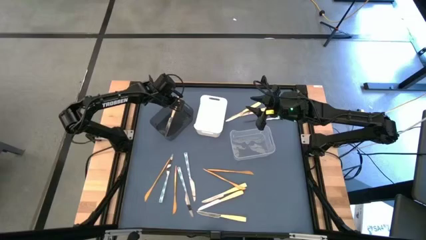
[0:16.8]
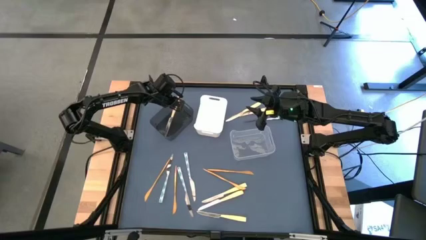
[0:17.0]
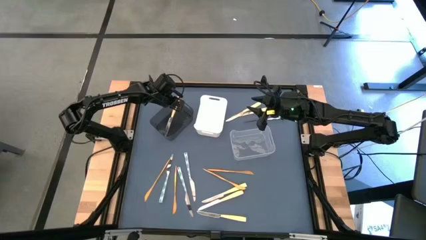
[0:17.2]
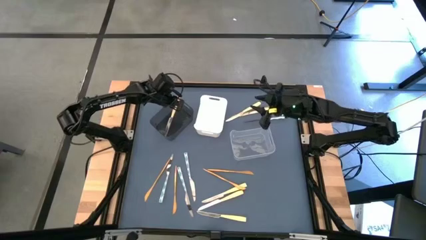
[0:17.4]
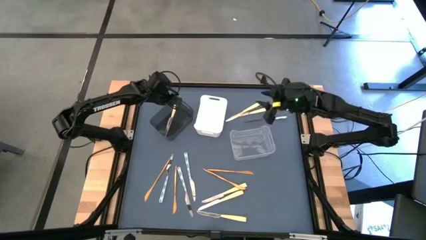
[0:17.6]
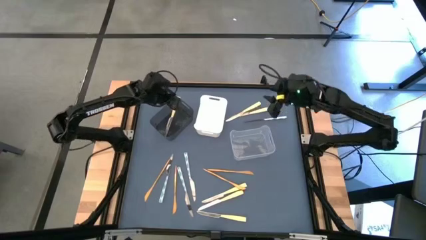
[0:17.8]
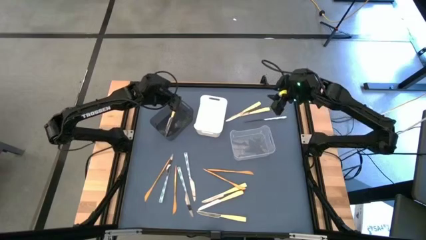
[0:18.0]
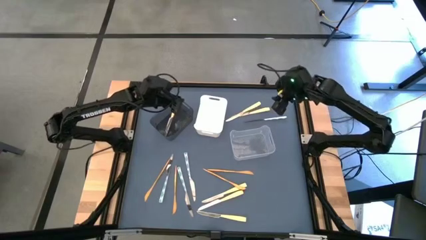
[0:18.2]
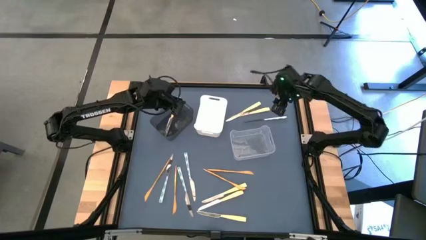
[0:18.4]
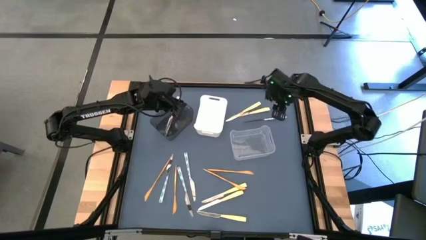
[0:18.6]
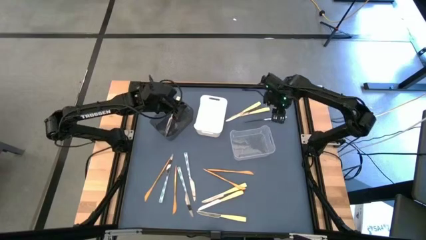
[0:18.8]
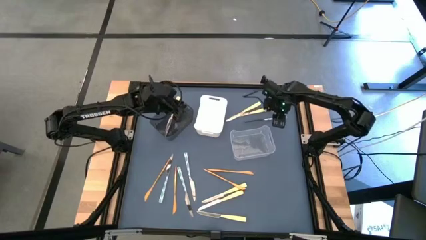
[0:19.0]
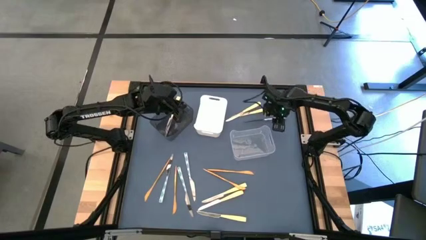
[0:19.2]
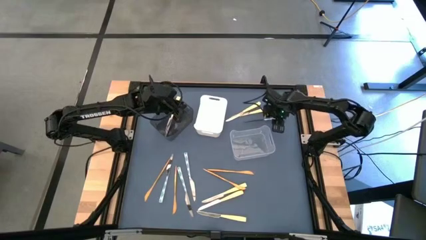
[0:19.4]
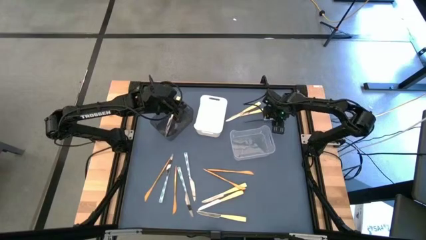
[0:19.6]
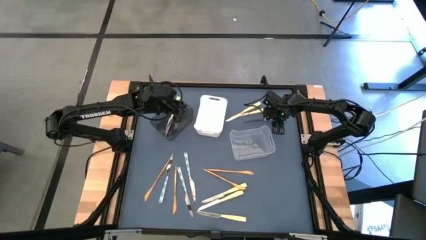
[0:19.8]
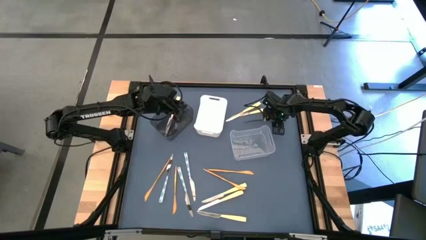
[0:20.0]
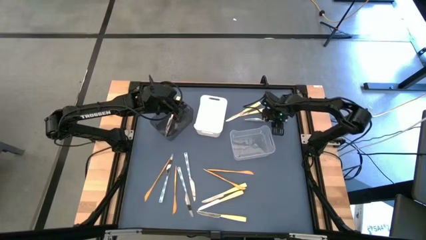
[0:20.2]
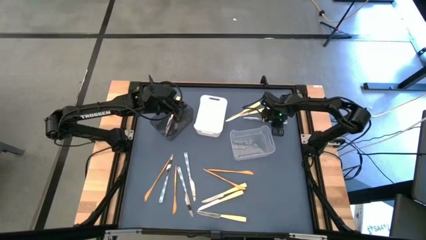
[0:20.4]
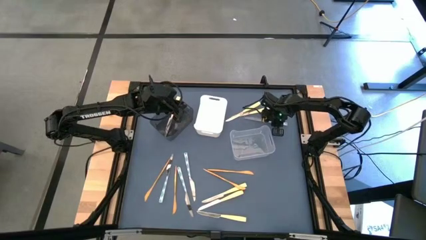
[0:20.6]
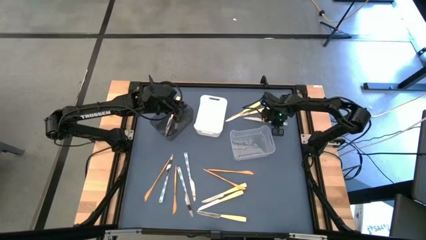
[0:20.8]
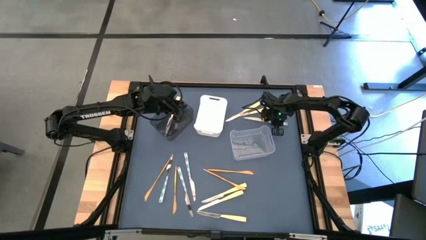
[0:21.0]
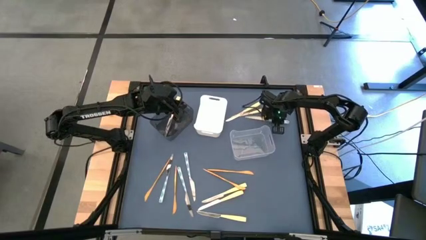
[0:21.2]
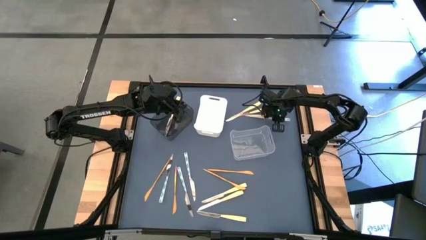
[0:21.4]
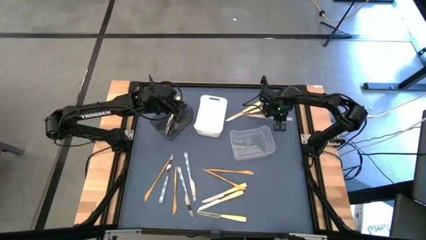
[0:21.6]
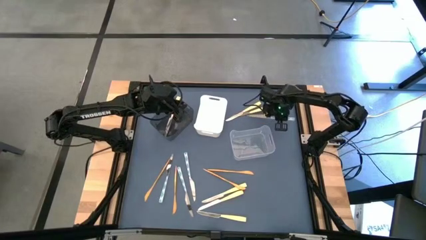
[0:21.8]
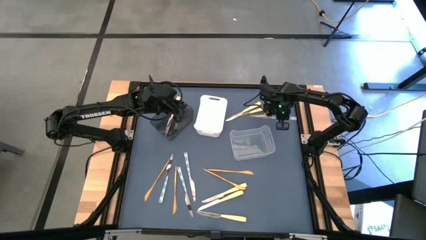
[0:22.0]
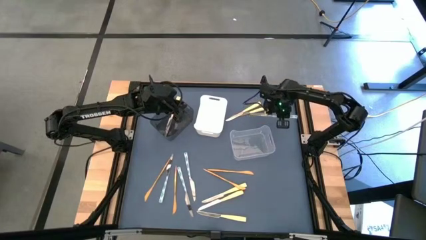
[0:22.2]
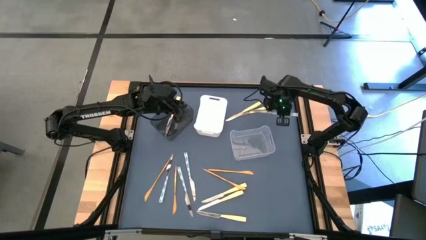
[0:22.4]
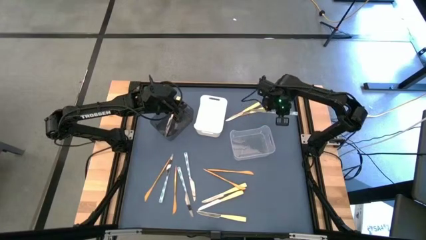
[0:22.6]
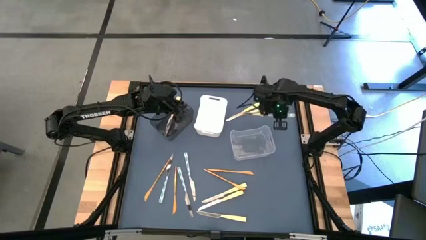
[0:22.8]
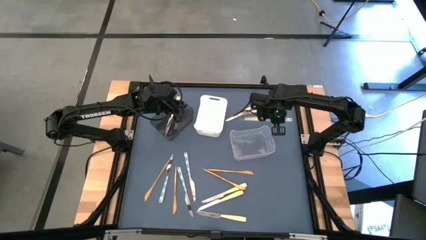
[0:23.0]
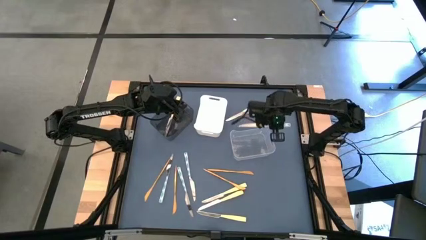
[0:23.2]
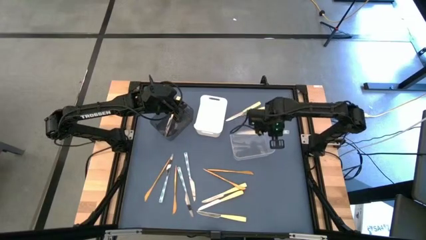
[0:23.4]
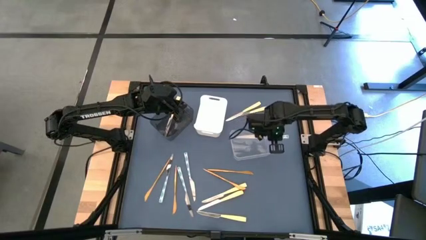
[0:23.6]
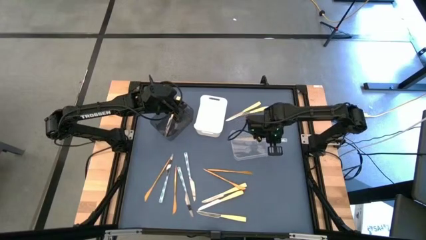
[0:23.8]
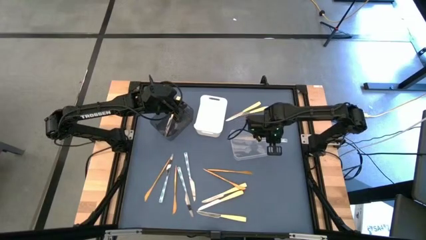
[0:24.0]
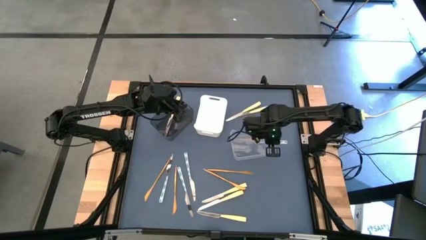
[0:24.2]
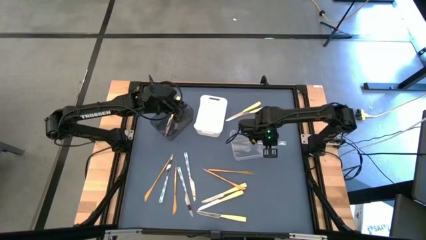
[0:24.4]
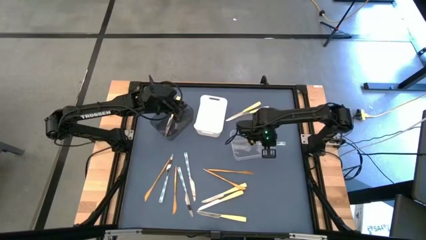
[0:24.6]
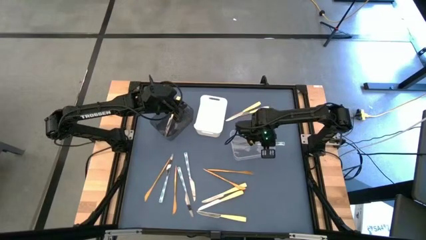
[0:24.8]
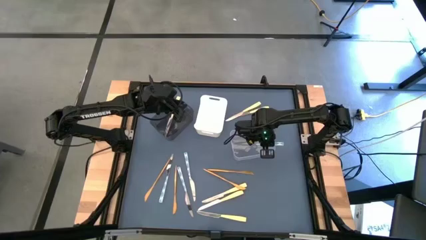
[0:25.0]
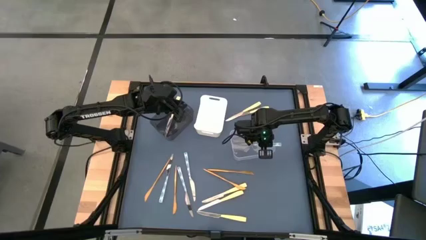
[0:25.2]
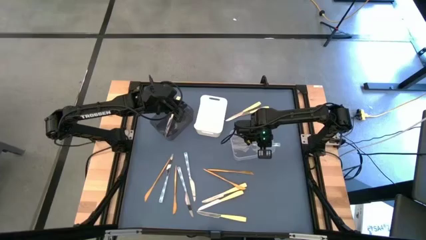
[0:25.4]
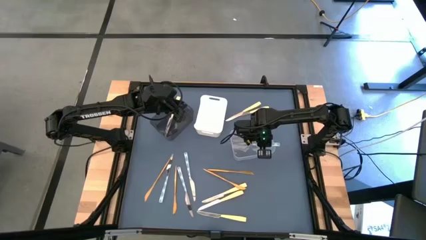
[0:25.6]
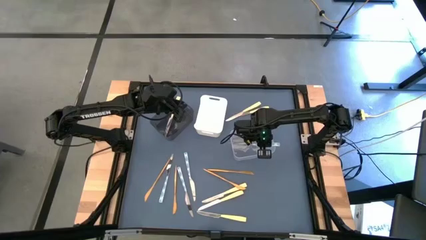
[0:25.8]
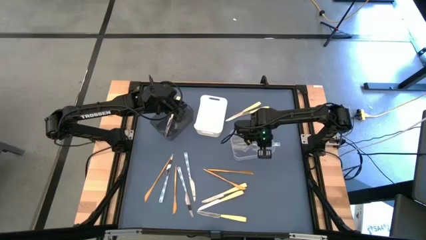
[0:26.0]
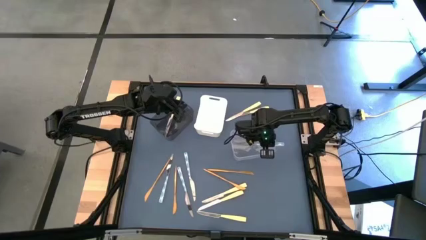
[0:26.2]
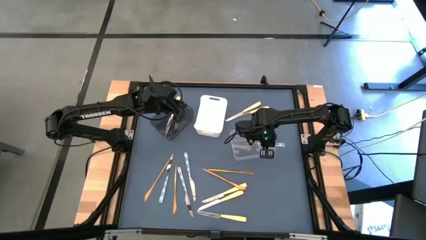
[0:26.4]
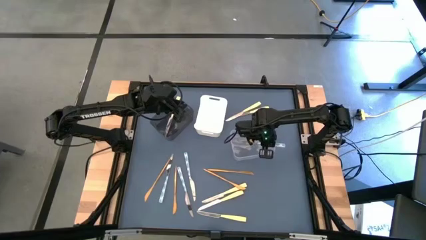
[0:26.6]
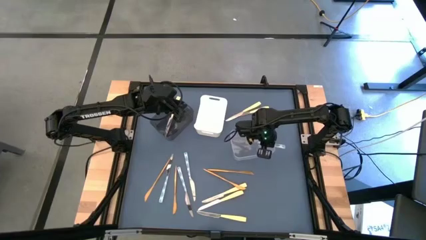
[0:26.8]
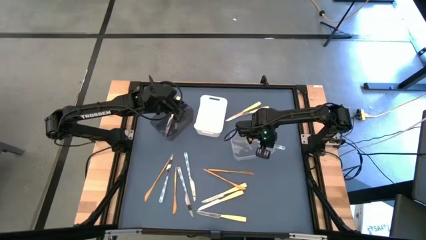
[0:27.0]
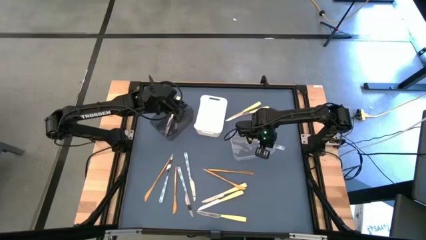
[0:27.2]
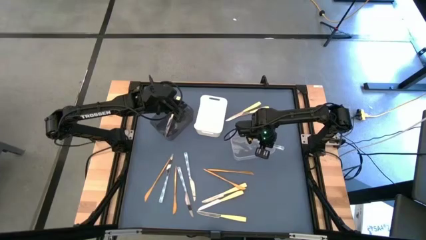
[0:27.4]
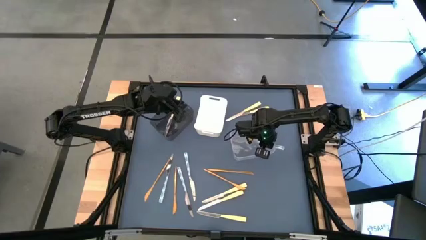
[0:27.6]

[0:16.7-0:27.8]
Task: Sort silverware by color (type)
Put the top green knife into the transparent bin

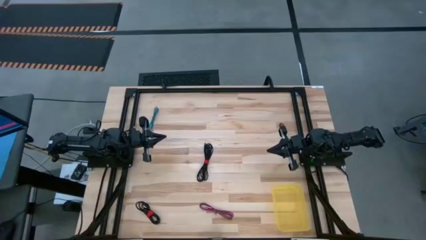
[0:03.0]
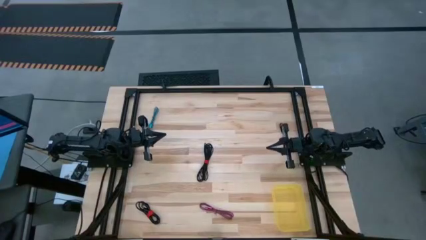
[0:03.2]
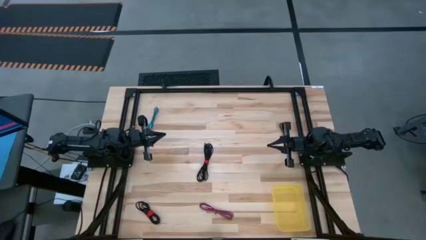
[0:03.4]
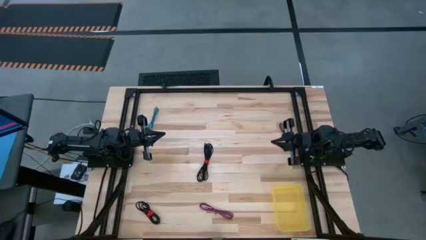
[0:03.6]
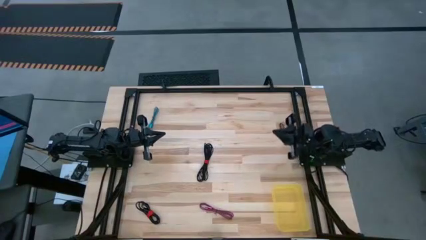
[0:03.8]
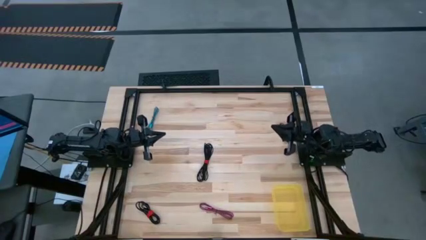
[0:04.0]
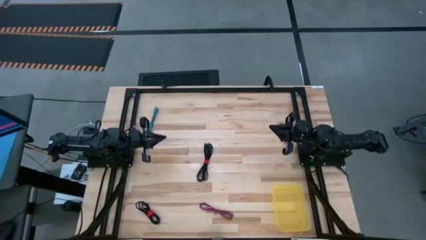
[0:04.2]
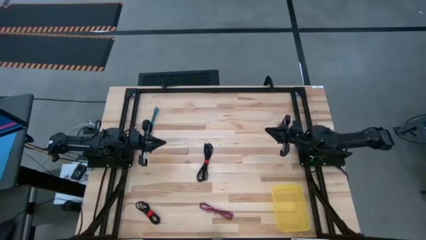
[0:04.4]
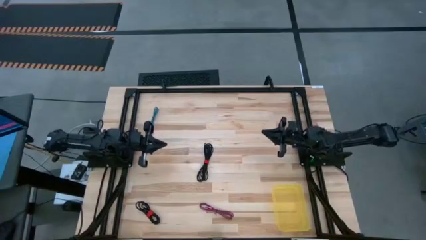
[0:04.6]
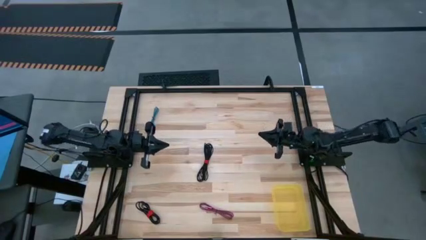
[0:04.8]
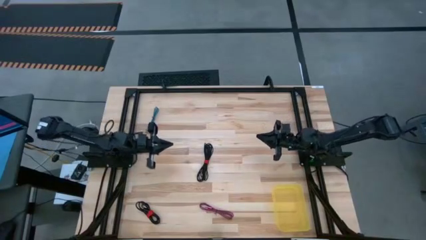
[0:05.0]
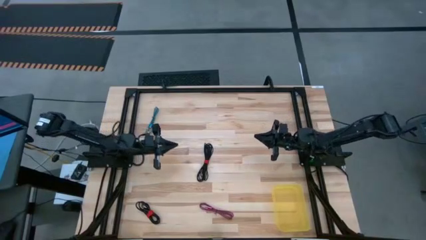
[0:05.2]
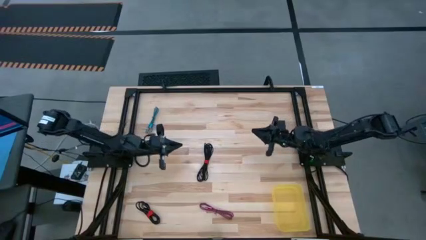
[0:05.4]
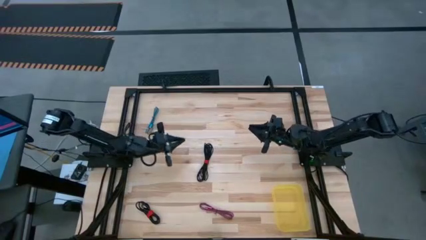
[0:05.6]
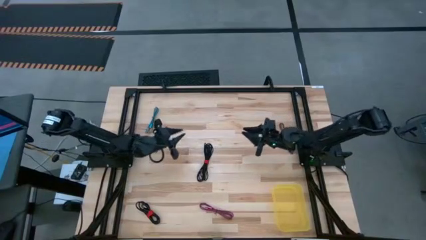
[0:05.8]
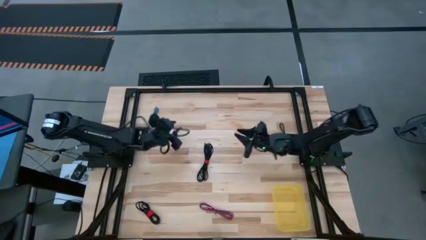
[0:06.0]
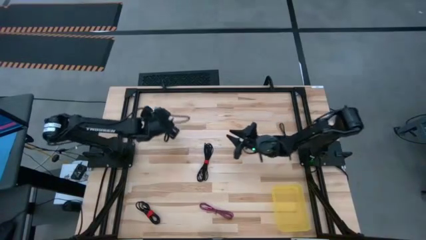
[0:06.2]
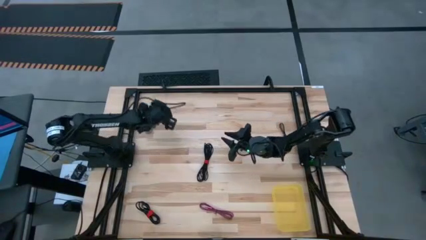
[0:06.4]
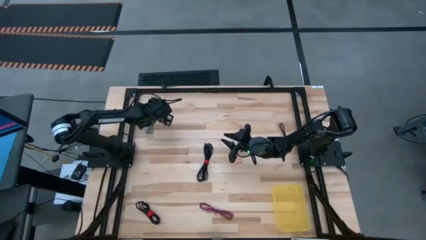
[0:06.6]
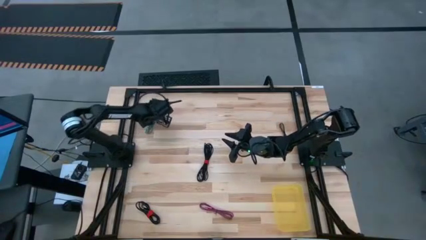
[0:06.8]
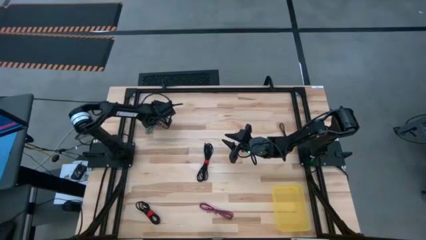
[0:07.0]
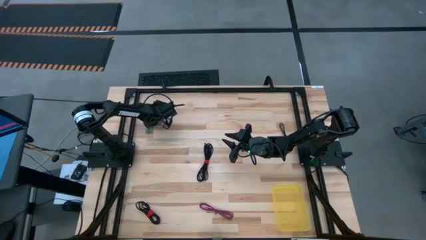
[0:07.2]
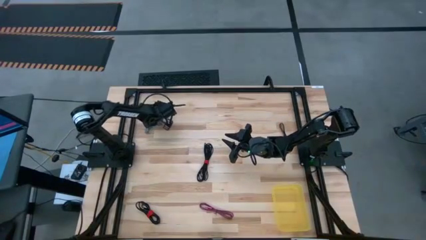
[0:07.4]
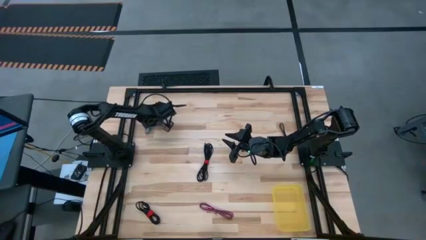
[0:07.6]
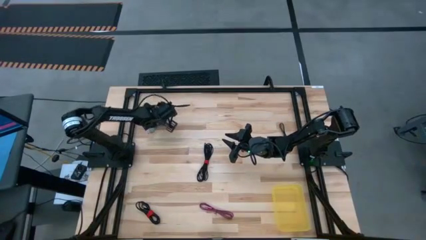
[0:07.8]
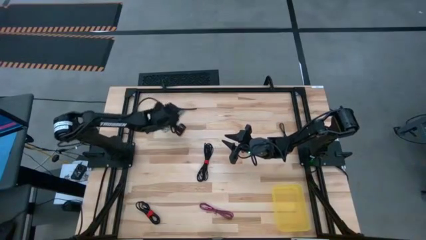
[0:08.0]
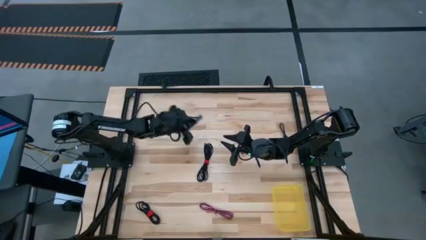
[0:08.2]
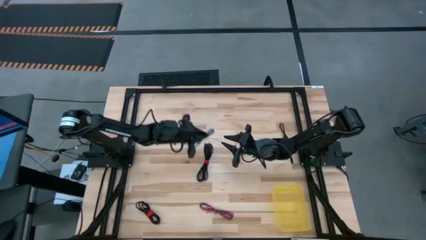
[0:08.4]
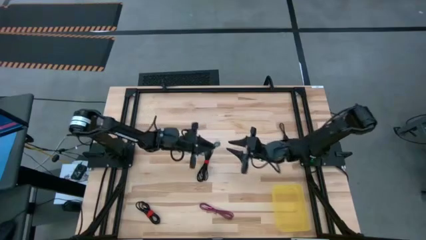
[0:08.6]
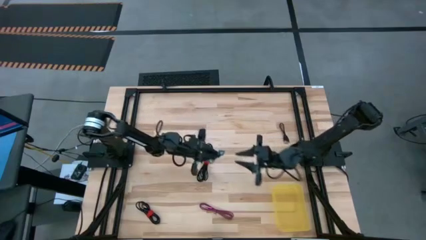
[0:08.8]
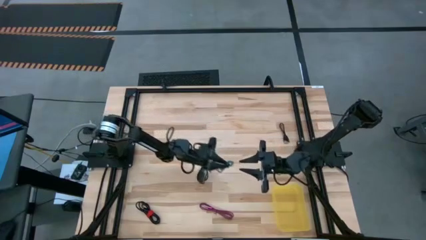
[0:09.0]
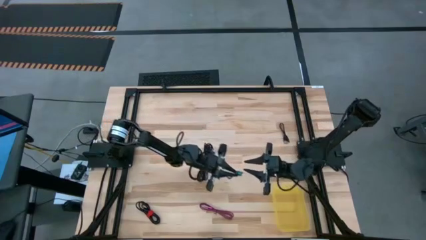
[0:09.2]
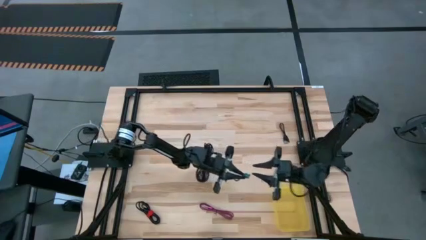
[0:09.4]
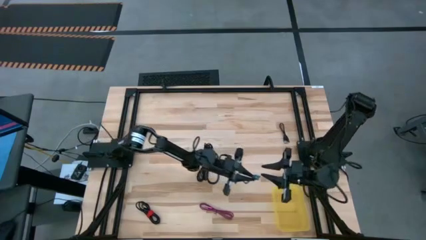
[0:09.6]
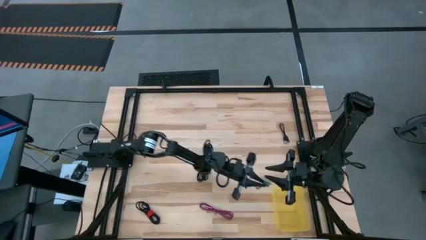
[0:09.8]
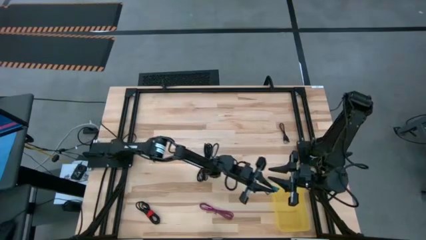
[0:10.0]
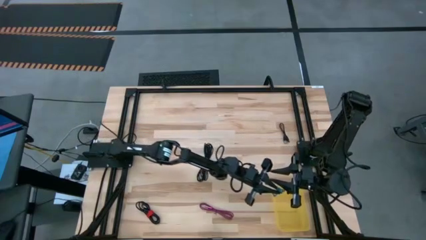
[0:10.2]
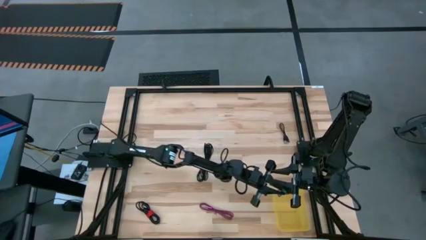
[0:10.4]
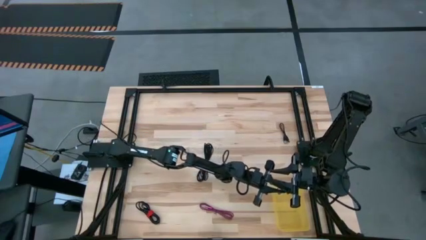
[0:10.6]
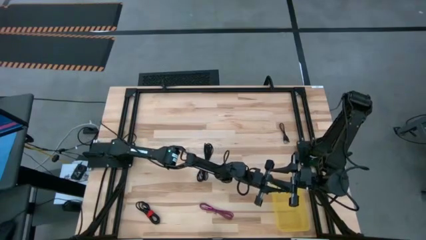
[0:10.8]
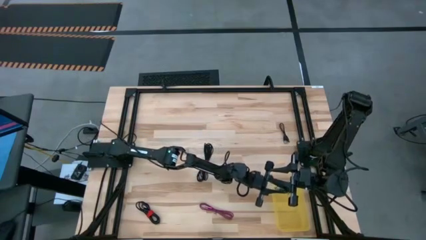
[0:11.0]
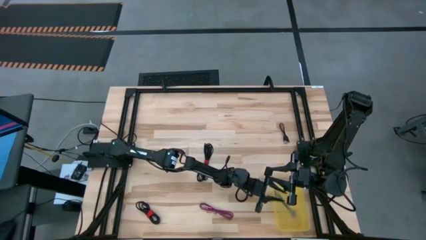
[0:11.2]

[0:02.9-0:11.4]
Task: Pick and place USB-C Cables
Put the blue cable charger into the yellow bin
